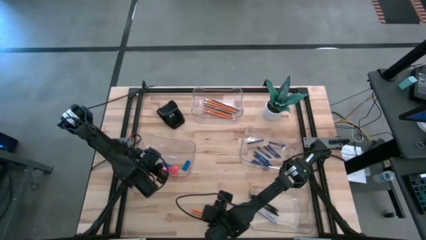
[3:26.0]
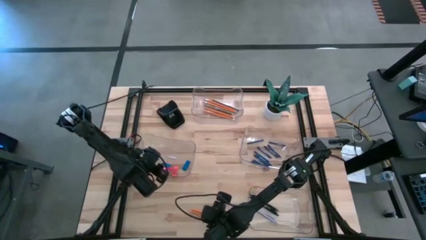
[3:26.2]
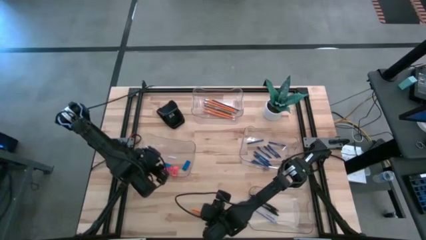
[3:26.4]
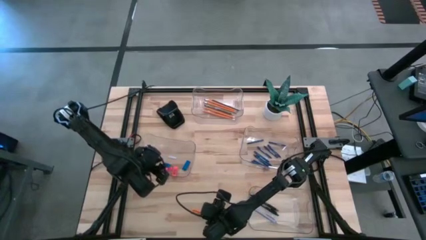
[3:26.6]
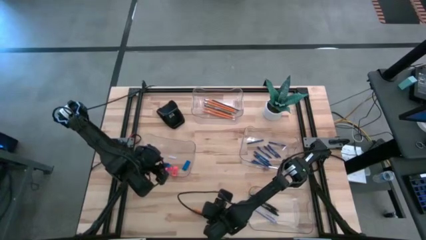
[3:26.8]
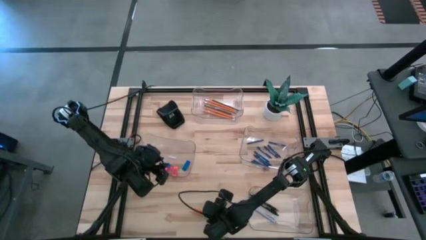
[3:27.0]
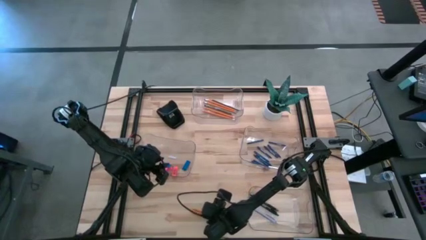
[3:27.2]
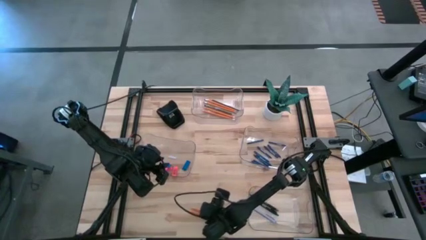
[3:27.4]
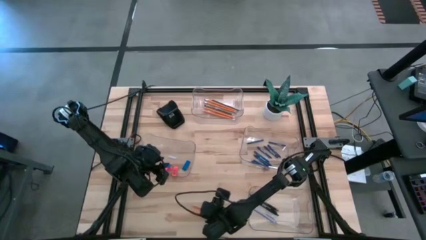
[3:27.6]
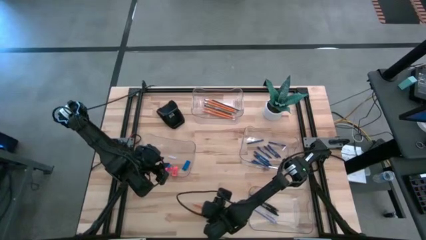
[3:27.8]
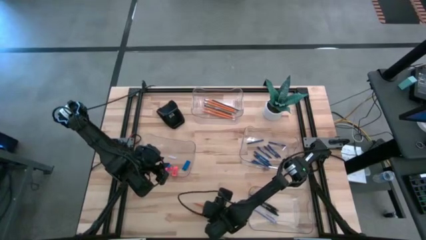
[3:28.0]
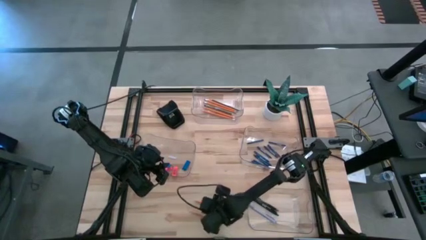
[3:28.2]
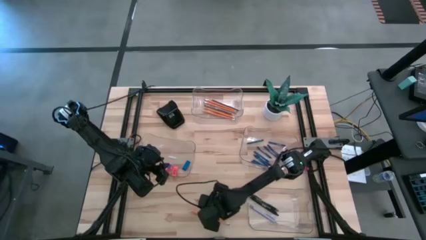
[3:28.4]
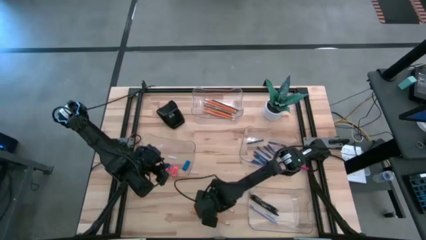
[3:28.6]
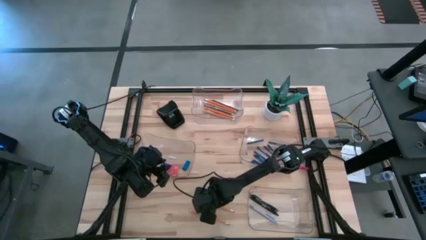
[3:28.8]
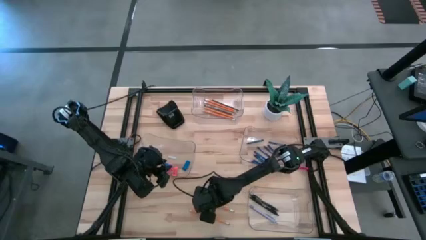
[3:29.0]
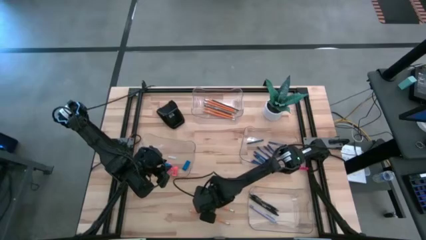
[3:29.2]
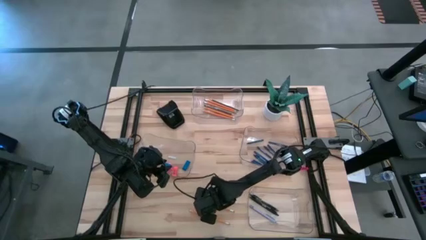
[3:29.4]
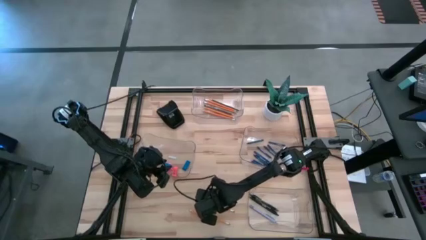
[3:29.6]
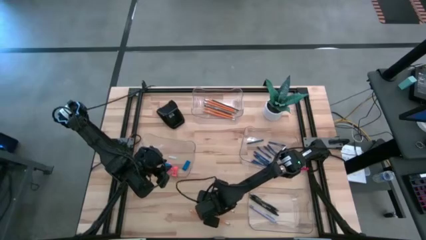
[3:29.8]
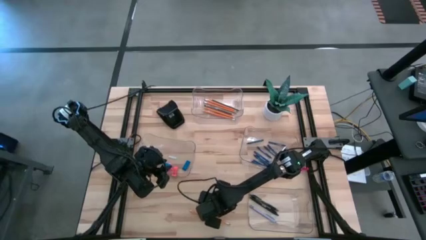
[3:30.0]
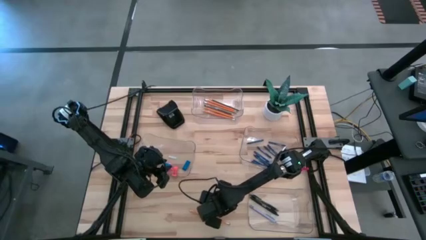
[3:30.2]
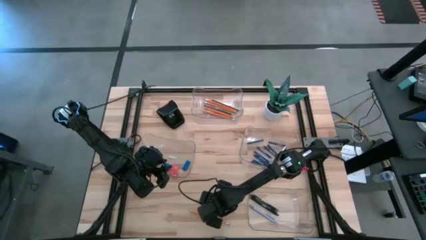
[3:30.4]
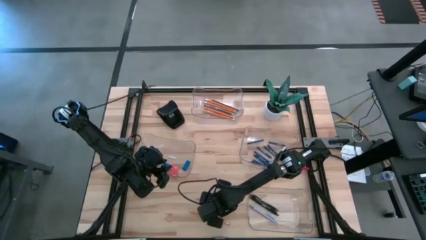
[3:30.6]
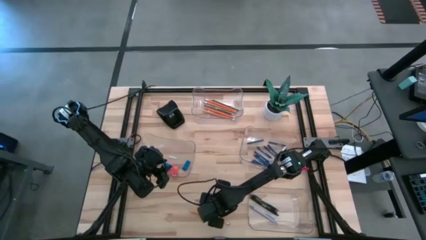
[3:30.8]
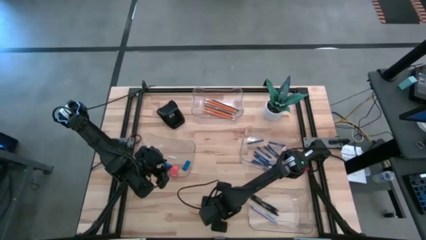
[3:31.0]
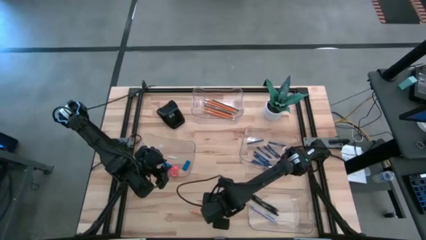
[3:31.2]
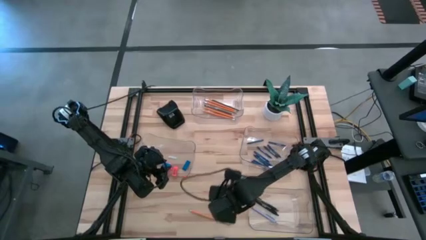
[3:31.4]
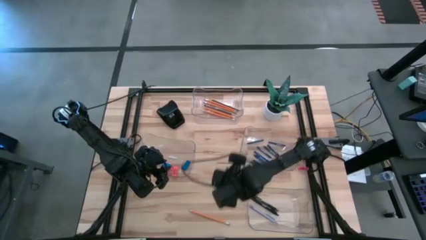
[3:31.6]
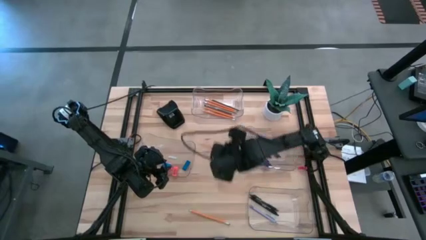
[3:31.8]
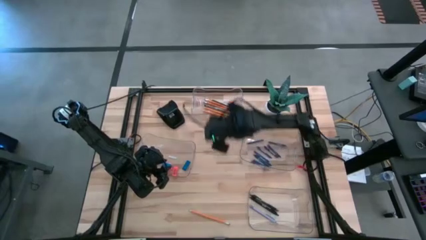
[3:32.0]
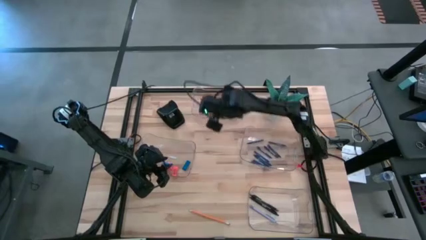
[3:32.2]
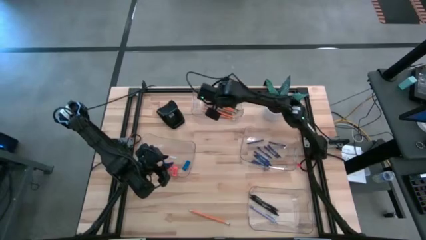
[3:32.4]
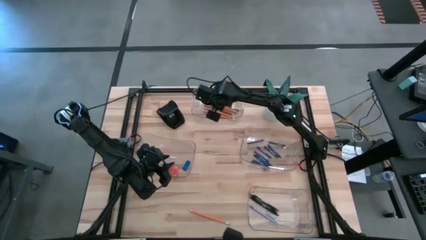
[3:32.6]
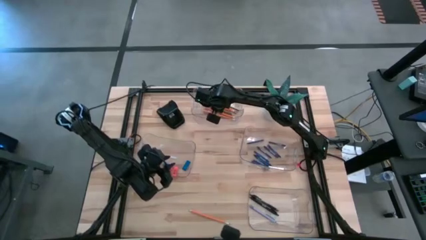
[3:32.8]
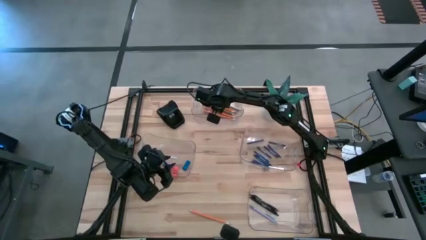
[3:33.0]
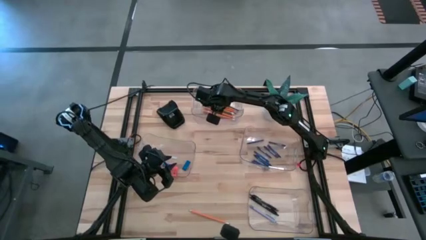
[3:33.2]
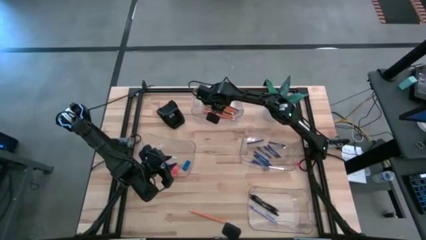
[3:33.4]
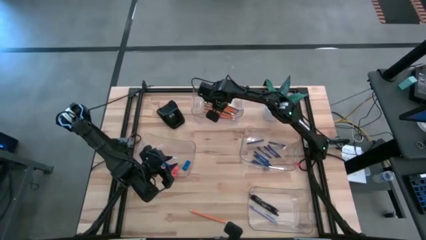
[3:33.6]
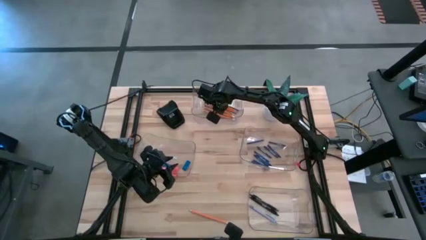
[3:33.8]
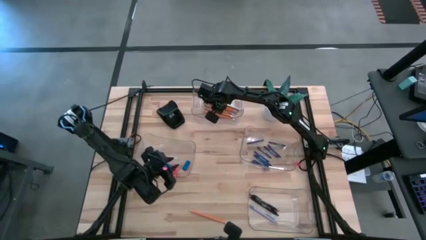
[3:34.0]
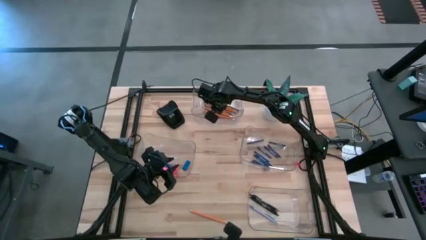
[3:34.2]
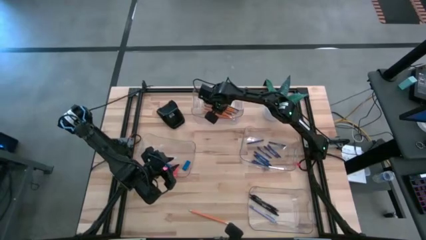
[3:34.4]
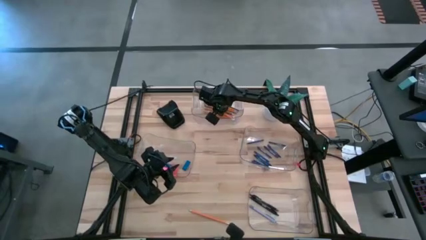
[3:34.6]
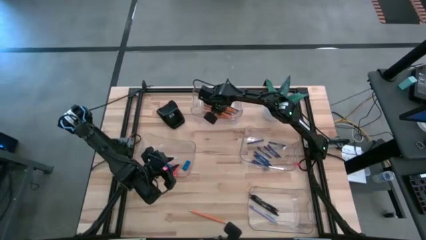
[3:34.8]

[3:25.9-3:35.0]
Task: Sort crayons/erasers/pens/pencils in bins
Put the yellow pencil into the top transparent bin

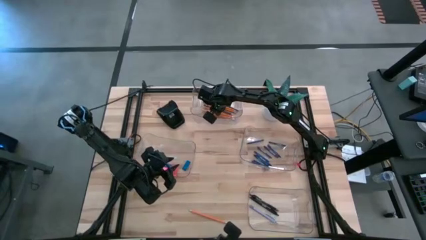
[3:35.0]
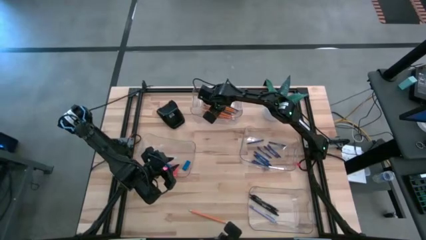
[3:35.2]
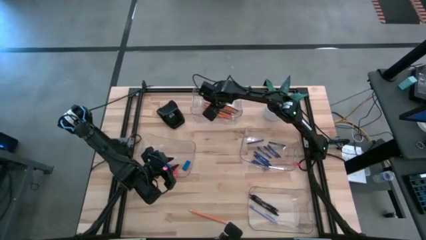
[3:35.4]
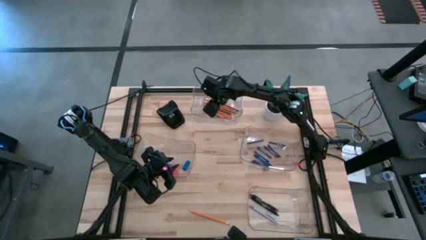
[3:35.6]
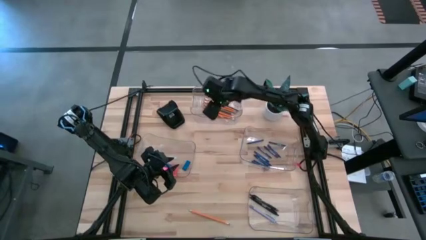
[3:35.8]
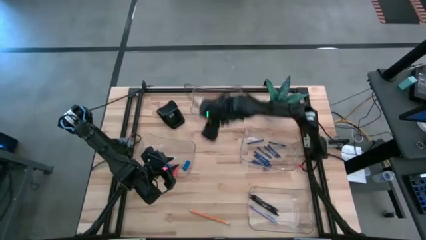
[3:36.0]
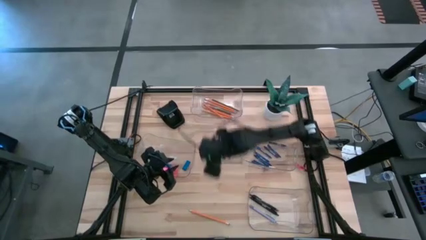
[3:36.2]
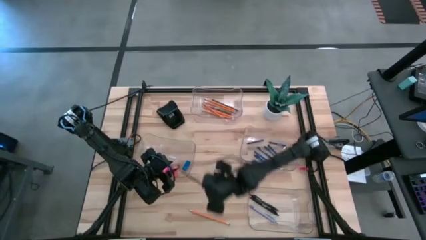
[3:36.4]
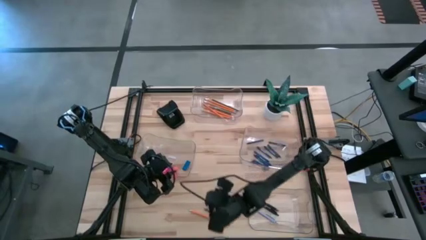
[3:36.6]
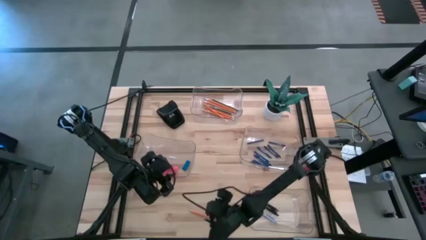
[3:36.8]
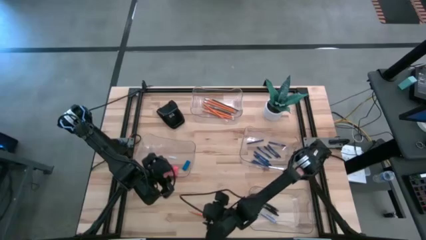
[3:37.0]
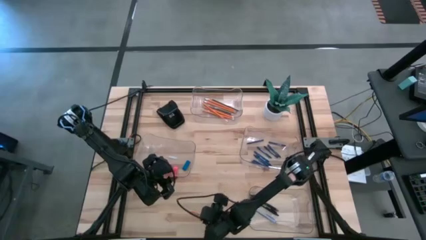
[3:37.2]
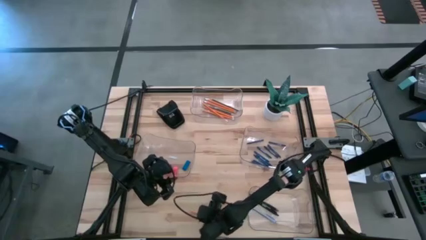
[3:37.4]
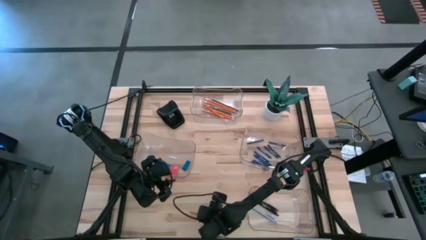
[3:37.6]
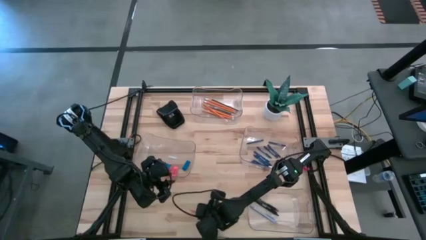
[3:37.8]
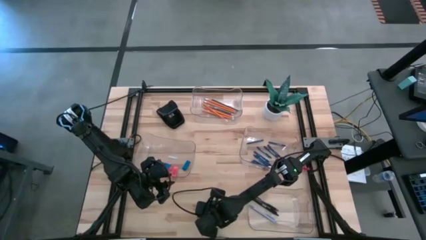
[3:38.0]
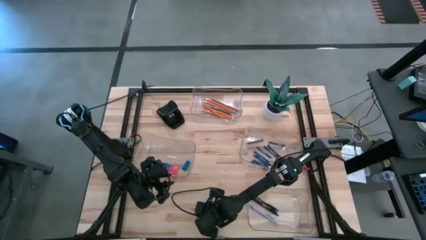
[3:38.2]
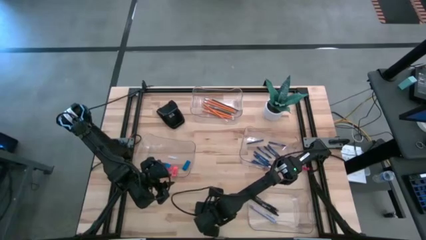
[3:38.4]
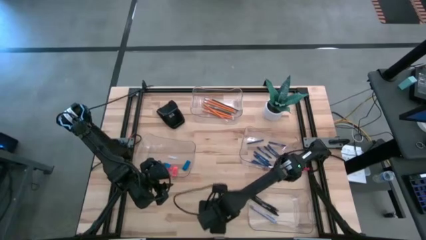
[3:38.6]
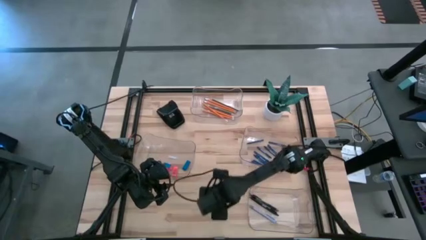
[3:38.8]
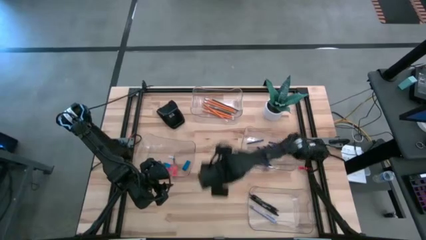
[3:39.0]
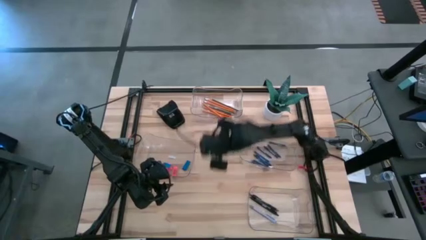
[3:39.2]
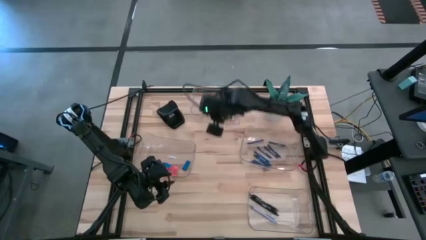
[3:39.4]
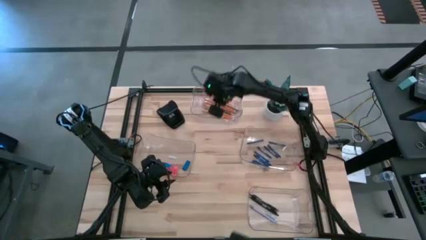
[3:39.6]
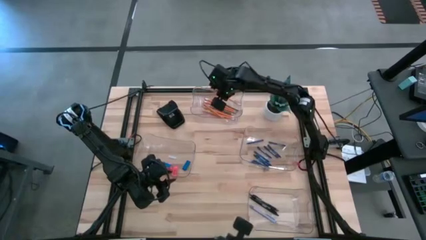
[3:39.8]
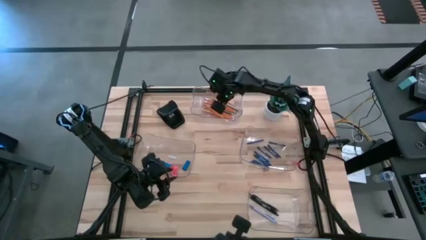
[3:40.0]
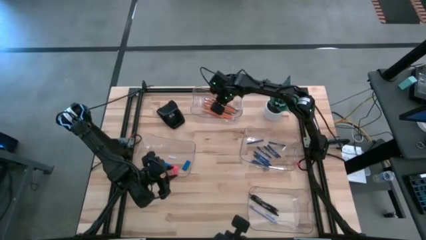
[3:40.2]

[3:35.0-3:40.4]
Put the yellow pencil into the top transparent bin

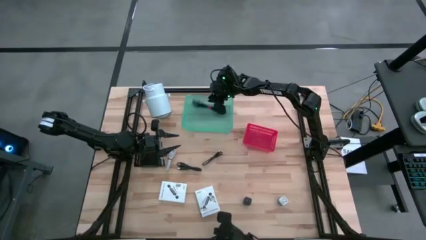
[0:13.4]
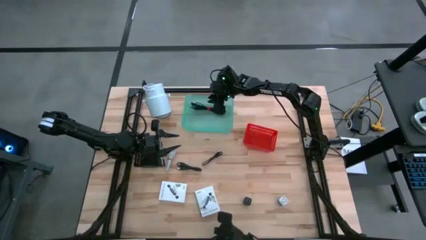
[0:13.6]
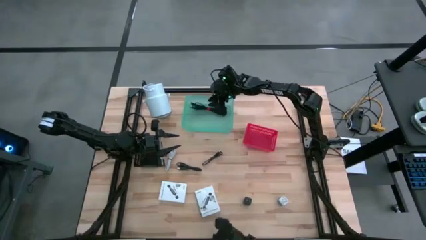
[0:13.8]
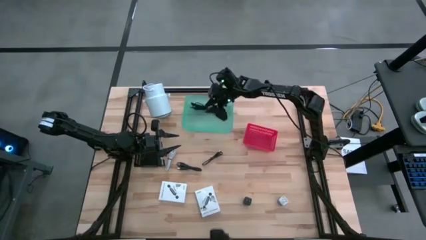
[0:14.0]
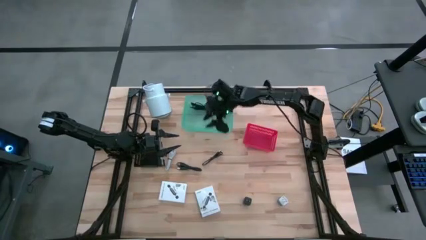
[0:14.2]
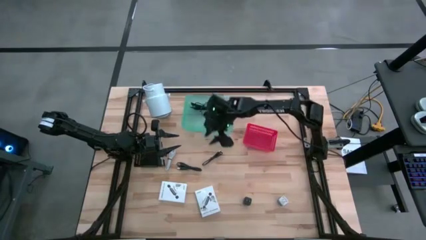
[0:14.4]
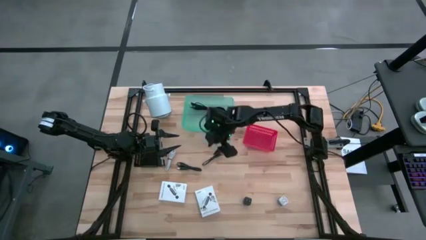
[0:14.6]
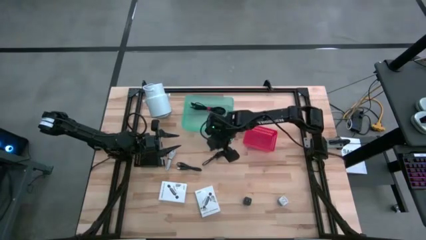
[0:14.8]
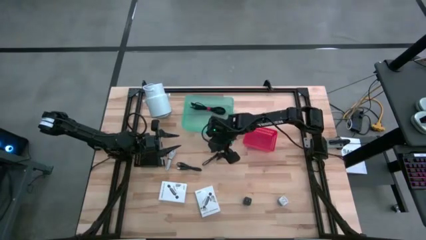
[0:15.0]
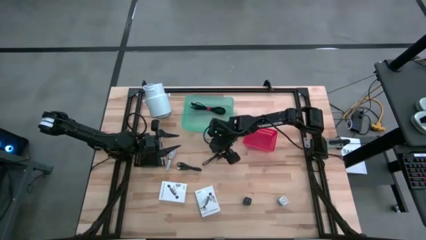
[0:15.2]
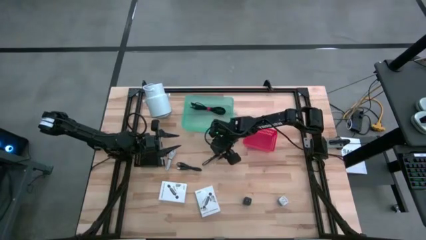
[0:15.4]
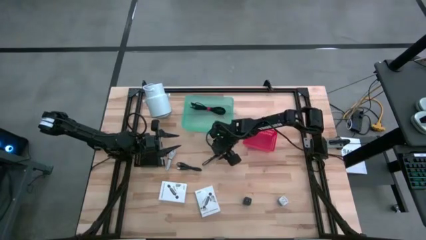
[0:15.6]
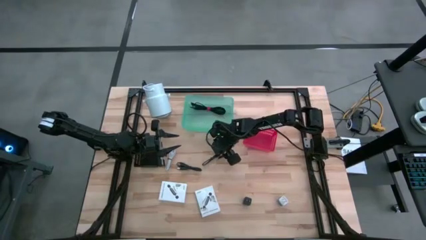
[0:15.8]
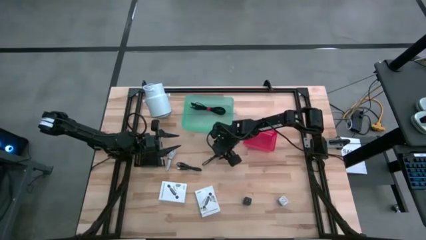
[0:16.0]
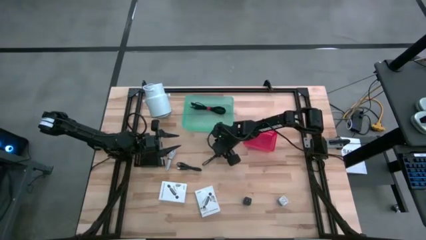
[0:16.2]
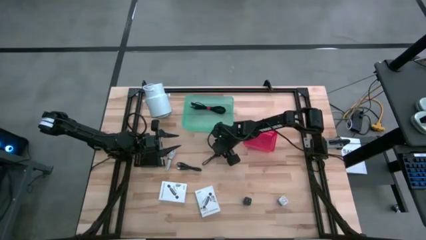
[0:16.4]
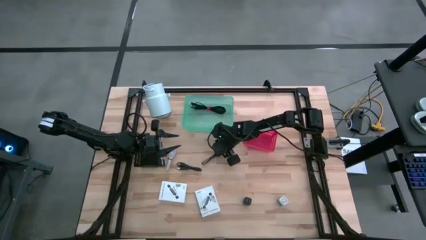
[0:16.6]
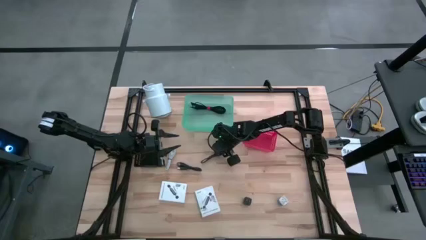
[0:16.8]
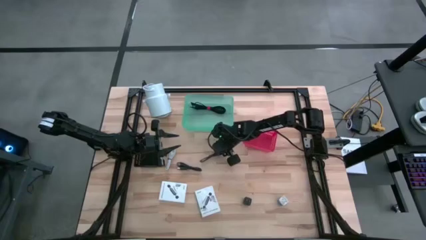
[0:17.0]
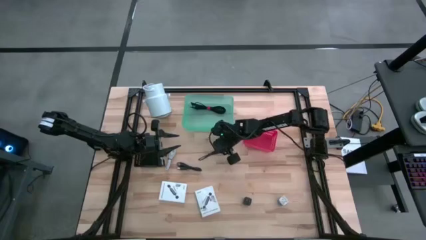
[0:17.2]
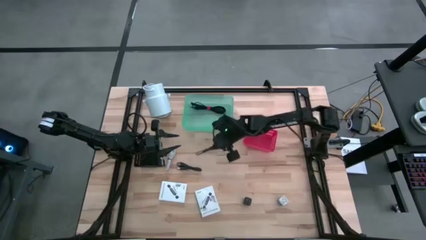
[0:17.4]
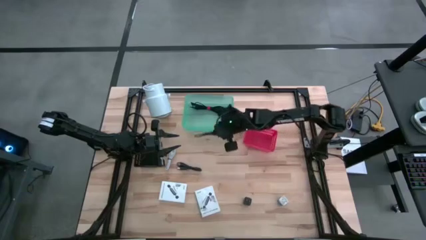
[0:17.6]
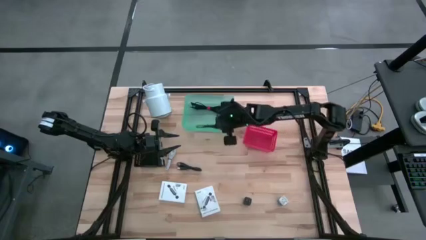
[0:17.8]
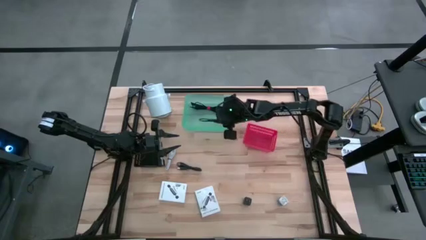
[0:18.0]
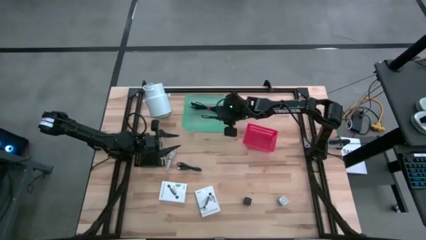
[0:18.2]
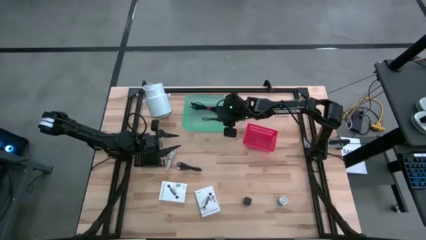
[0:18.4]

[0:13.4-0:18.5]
Task: Pick and place items into bin
Put the right black charger cable into the blue bin
